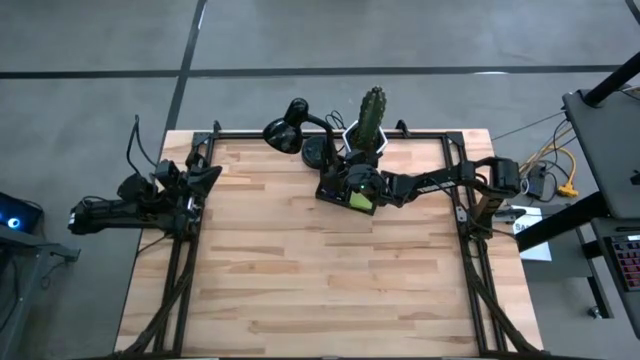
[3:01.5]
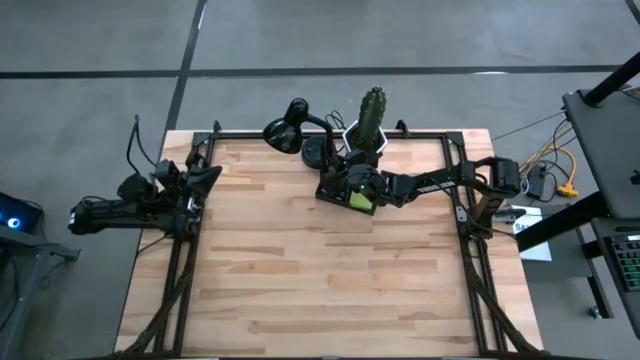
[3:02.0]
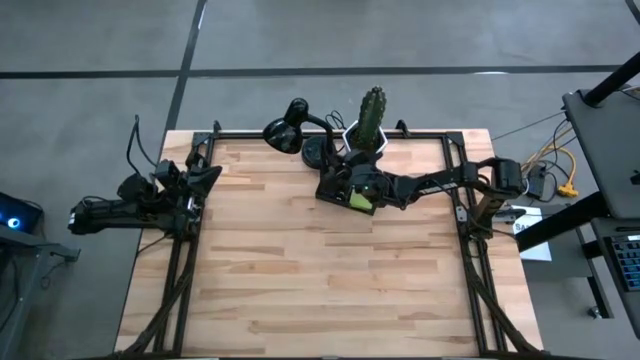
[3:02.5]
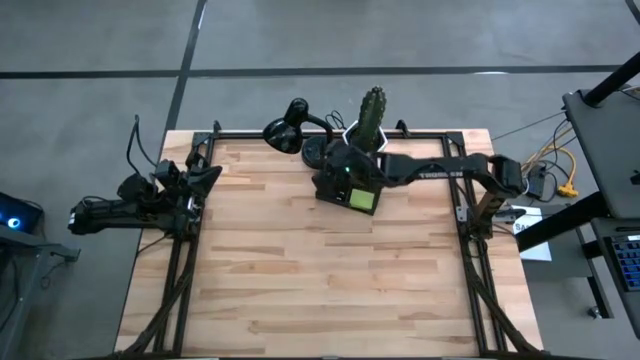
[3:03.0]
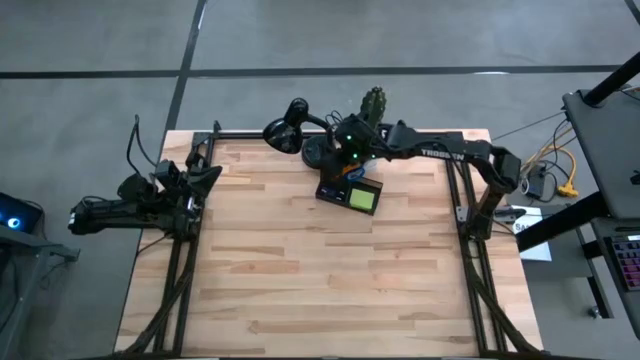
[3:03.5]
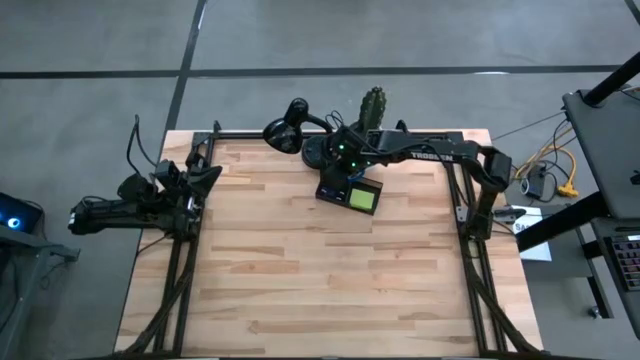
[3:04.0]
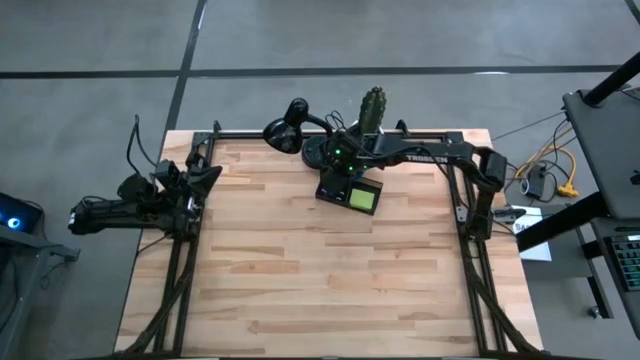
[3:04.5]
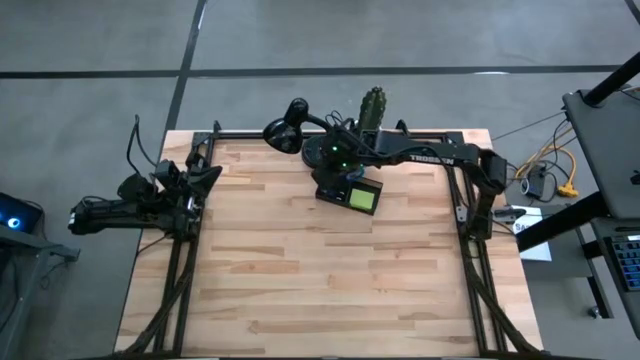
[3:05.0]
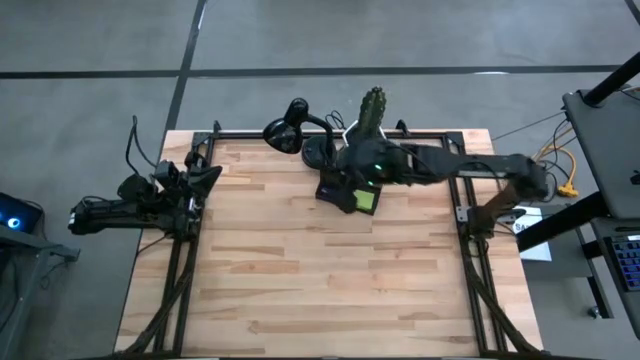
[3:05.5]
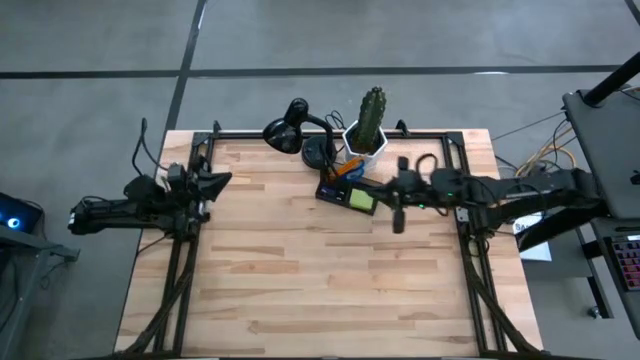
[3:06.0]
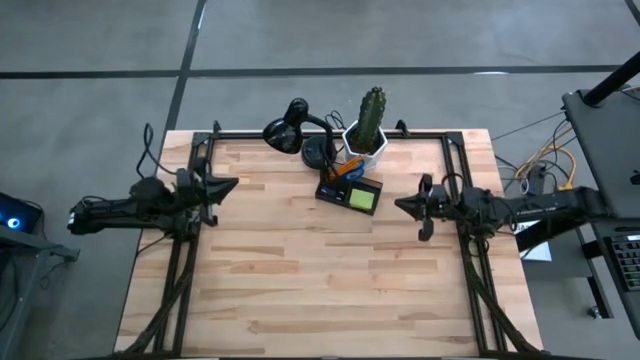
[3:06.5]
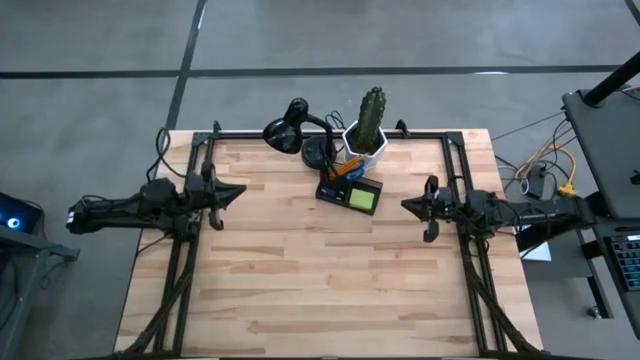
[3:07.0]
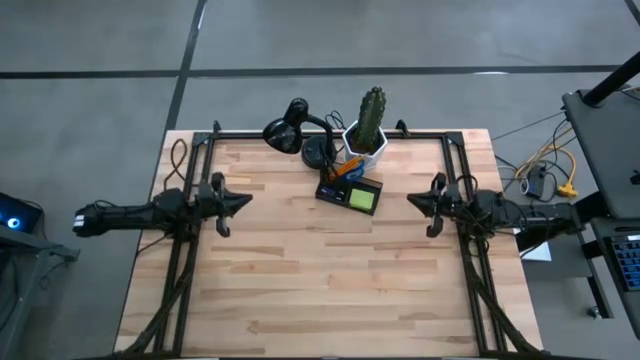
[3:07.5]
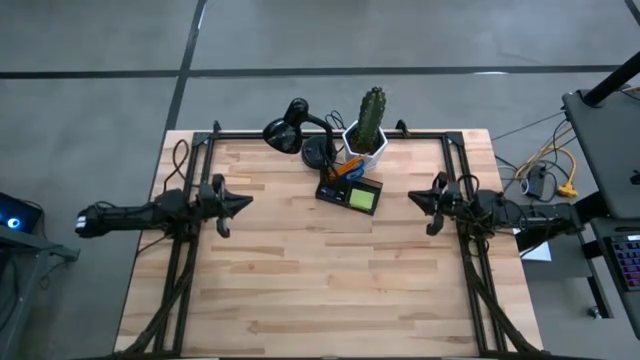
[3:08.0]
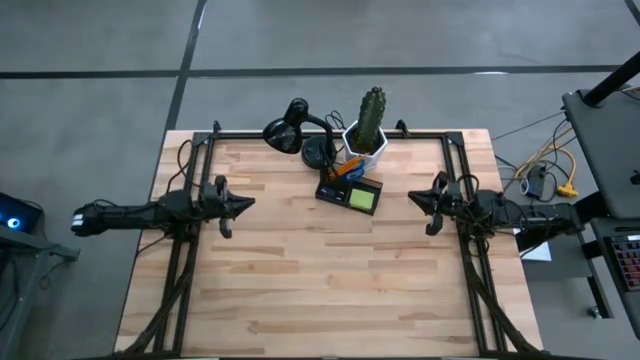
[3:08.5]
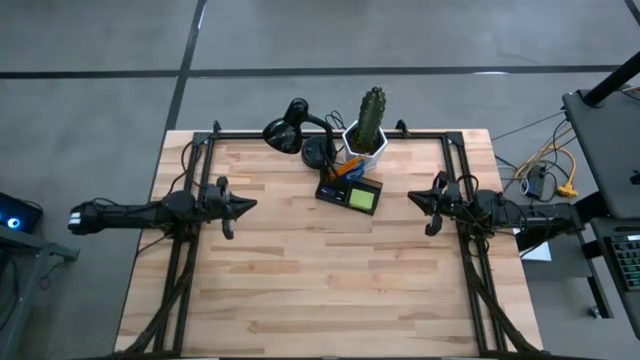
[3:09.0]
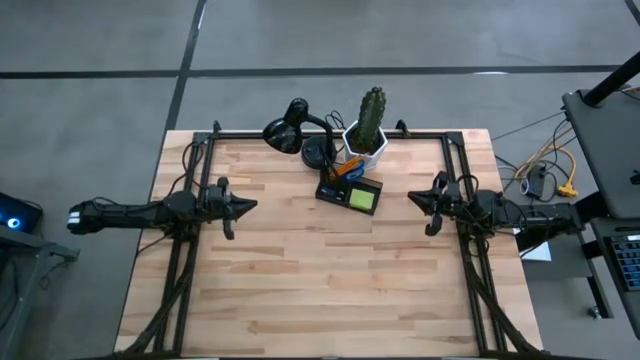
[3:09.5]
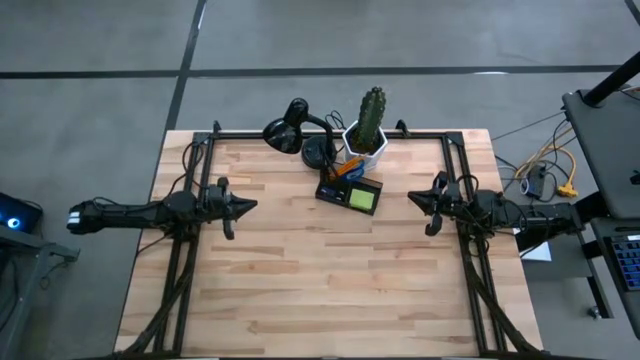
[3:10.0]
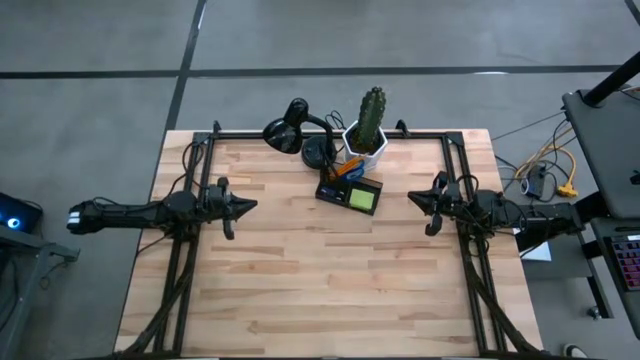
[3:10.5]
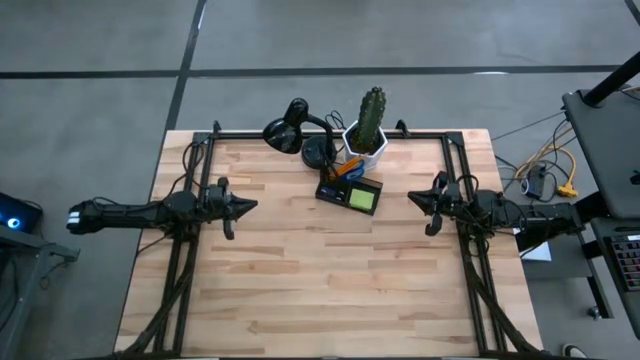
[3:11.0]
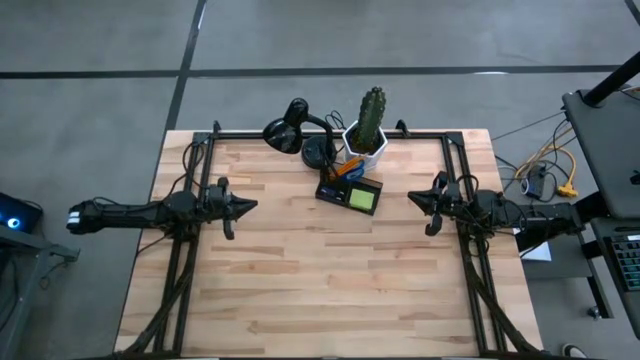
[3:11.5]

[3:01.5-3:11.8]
Task: Pick and place office supplies into organizer
Return to Home Position

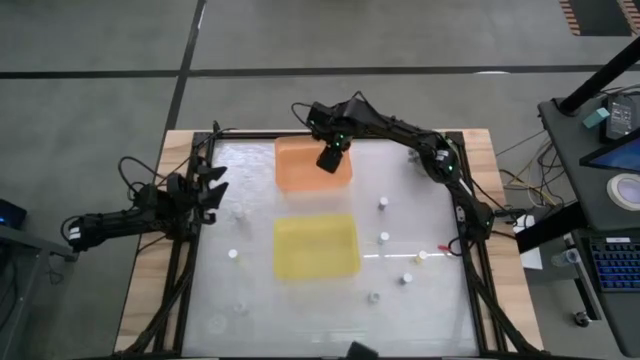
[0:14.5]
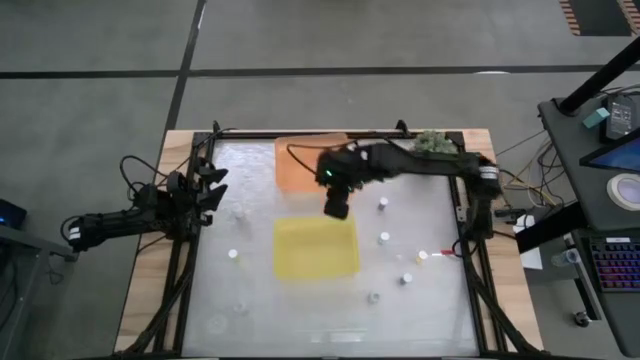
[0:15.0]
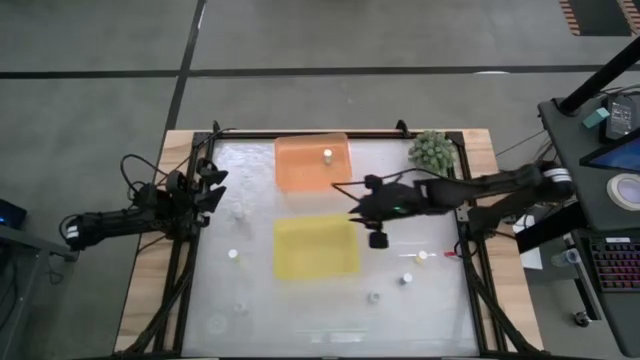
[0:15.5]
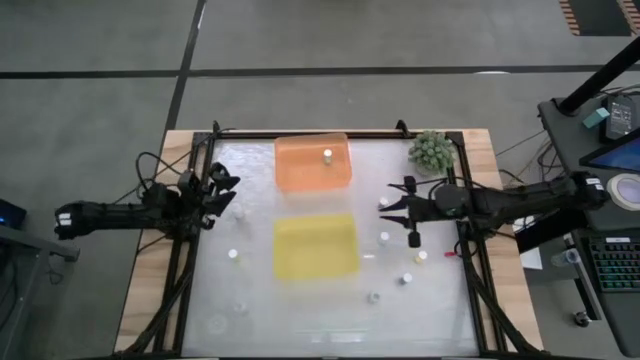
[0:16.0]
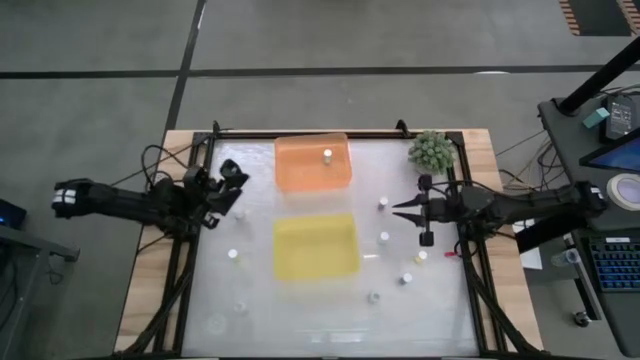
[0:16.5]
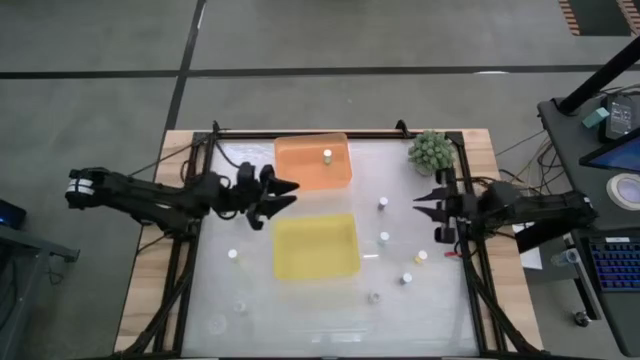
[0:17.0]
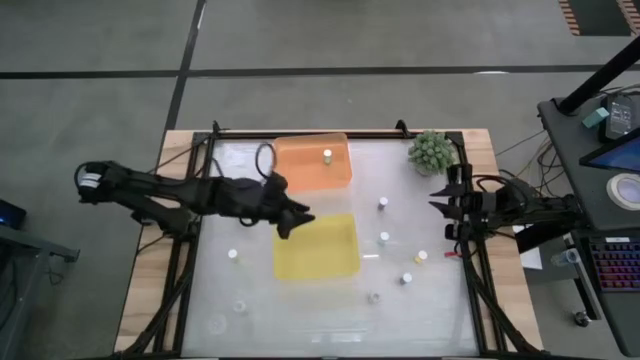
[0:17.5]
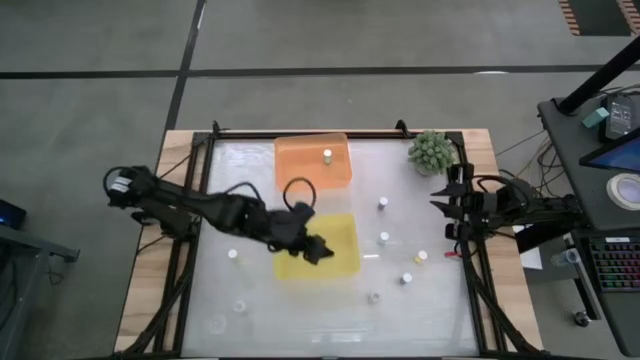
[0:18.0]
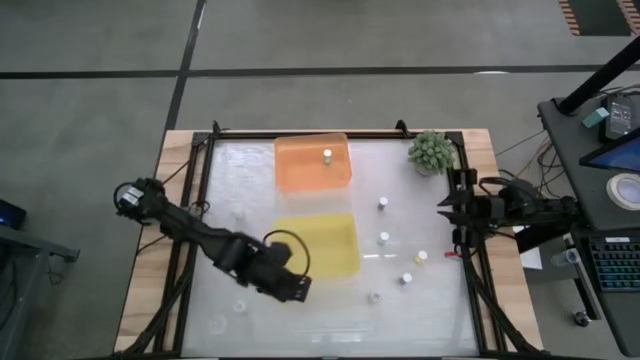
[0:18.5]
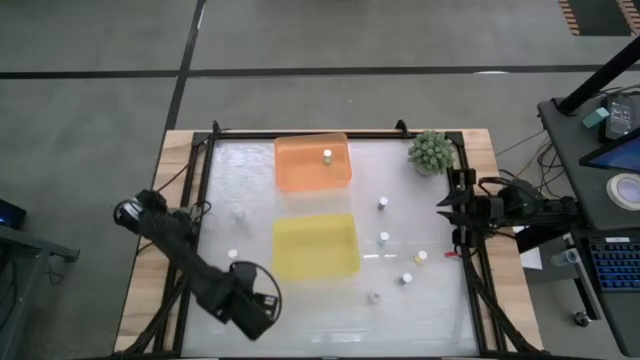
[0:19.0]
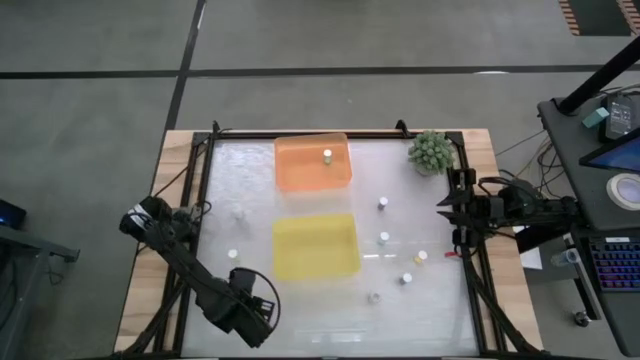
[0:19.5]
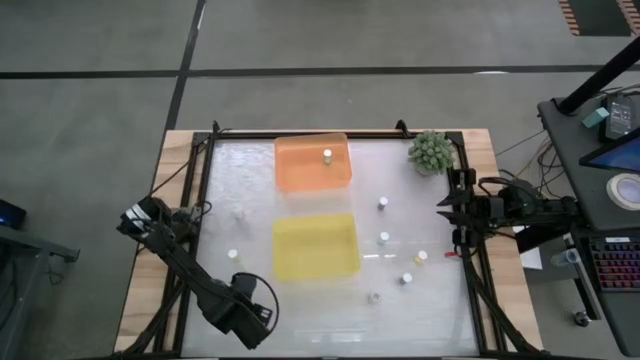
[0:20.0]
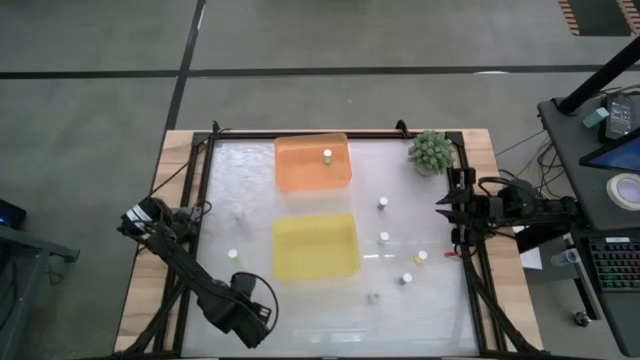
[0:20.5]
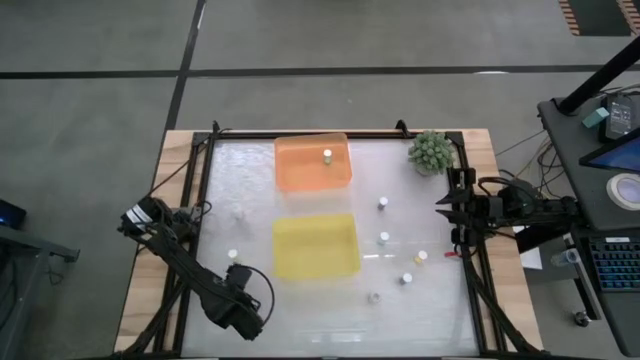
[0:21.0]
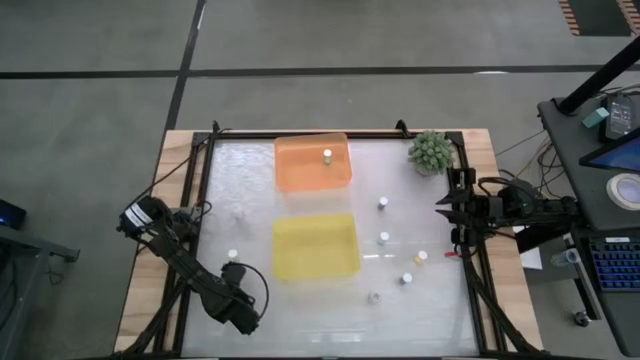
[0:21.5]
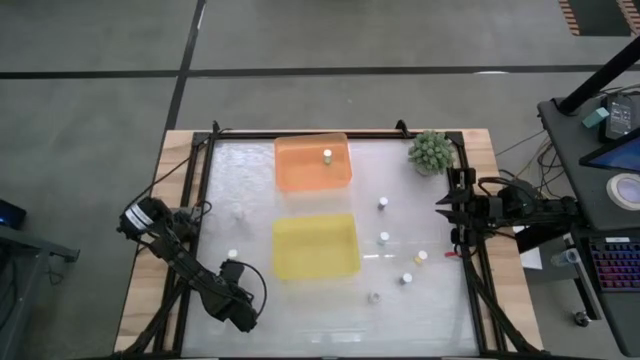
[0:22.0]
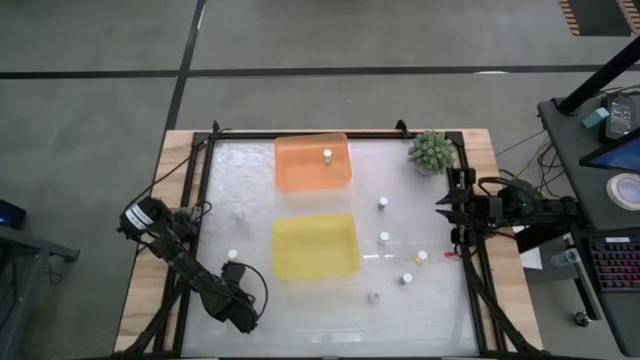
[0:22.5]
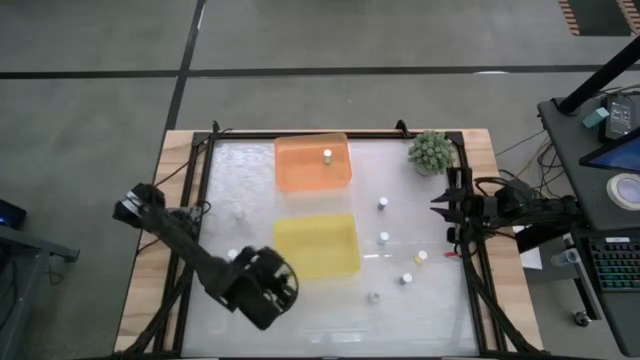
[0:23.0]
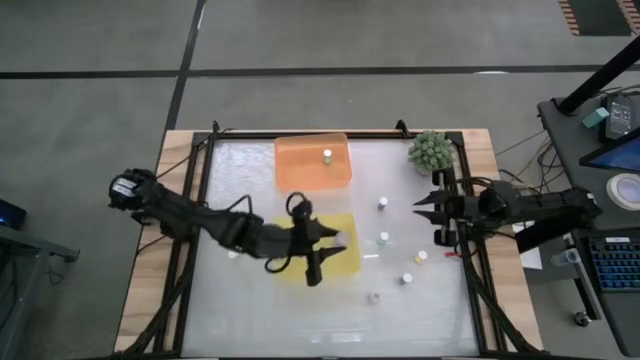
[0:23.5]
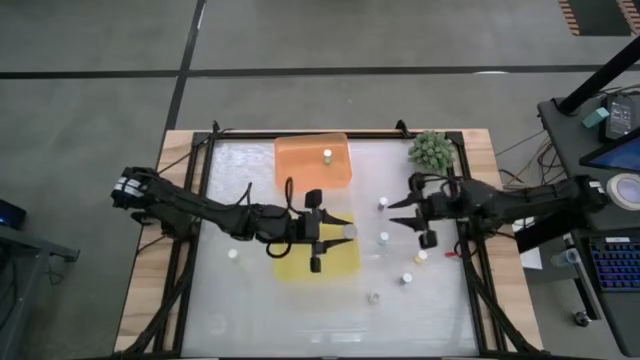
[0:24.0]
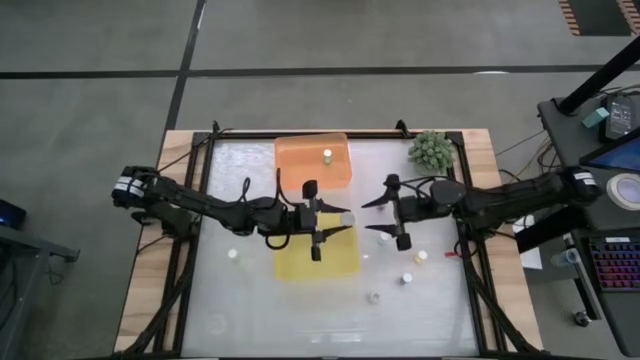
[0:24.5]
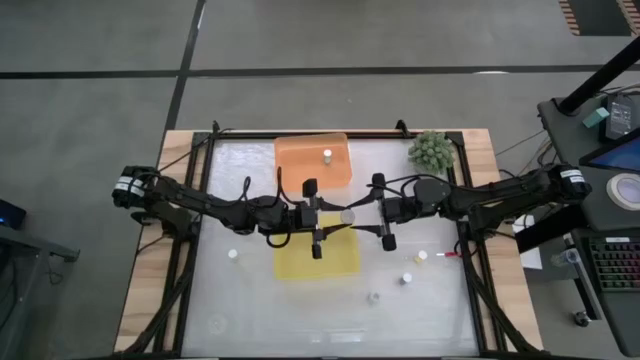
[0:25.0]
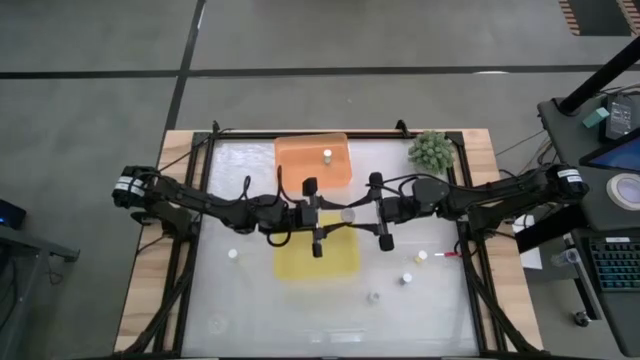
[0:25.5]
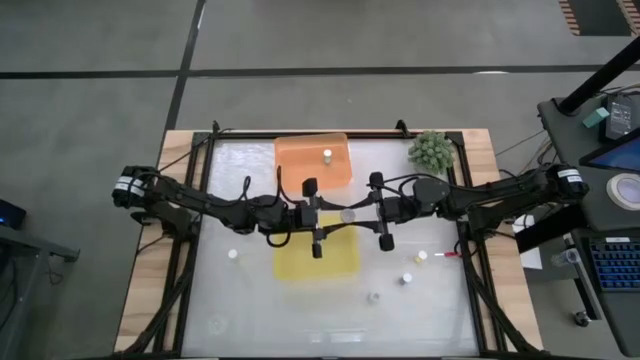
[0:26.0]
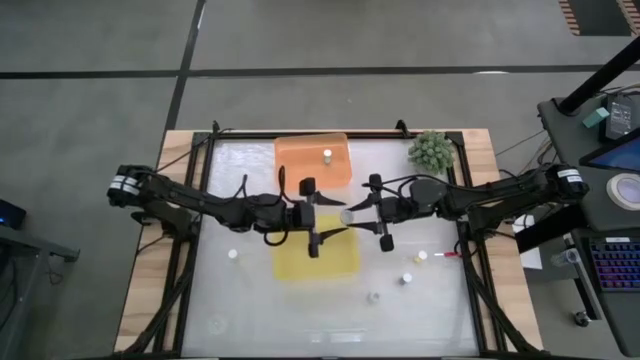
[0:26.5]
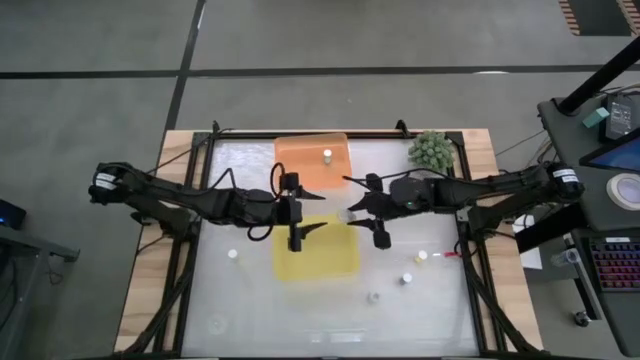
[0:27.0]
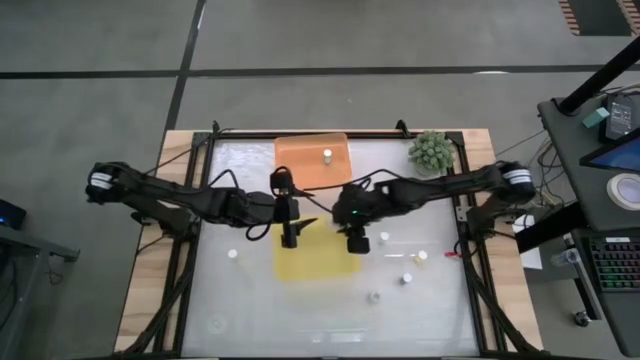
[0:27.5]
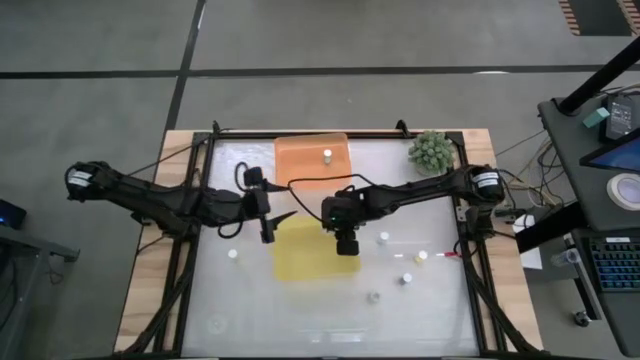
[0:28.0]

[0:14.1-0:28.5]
Task: Pick and place medicine bottles into bin by pill shape (circle, oval)
Put the bottom left transparent capsule bottle into the yellow bin
